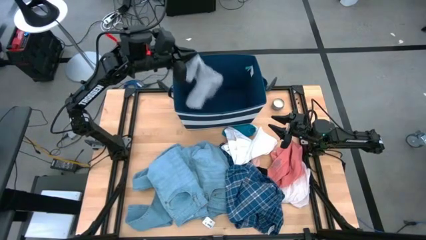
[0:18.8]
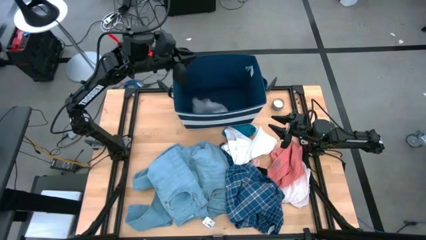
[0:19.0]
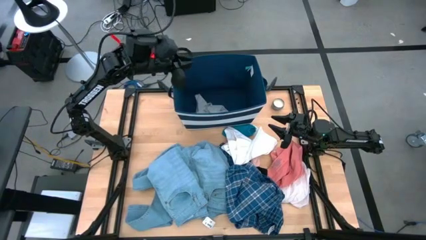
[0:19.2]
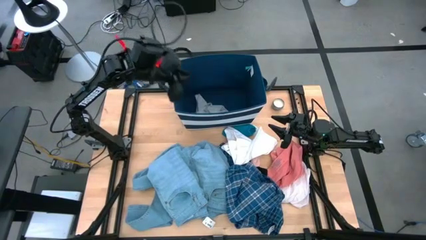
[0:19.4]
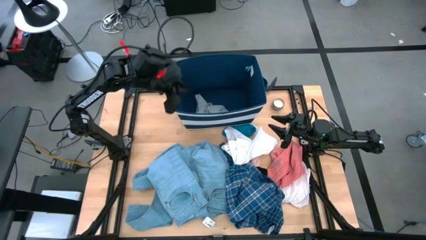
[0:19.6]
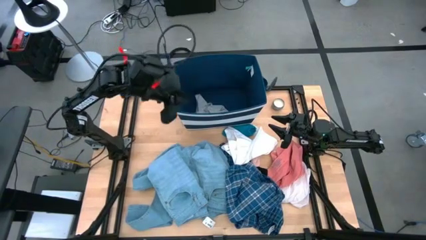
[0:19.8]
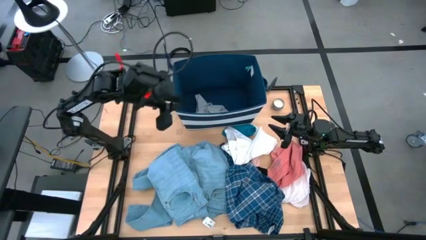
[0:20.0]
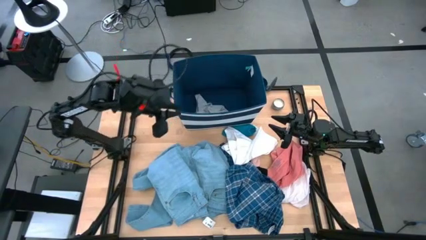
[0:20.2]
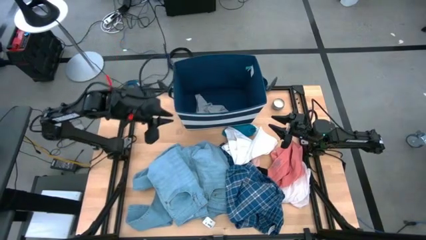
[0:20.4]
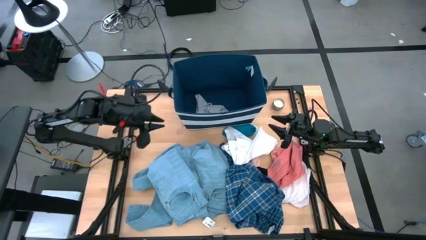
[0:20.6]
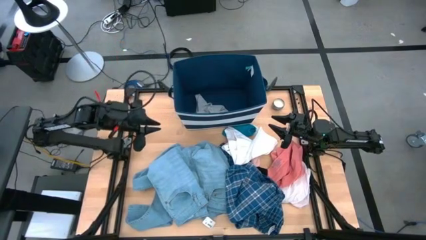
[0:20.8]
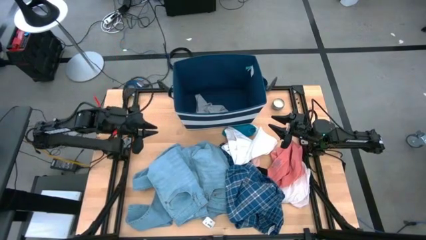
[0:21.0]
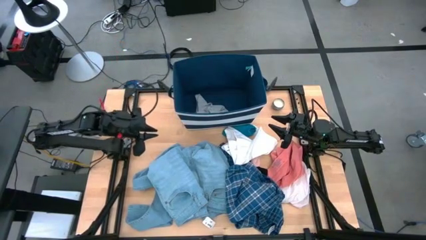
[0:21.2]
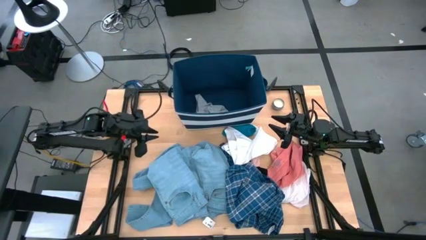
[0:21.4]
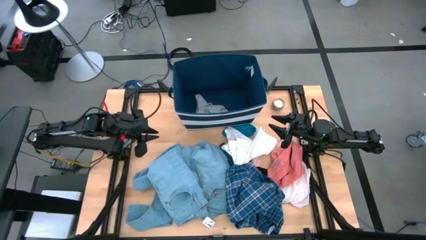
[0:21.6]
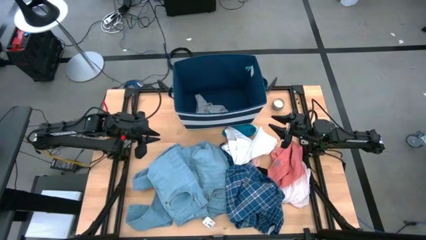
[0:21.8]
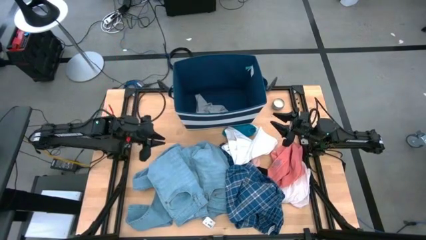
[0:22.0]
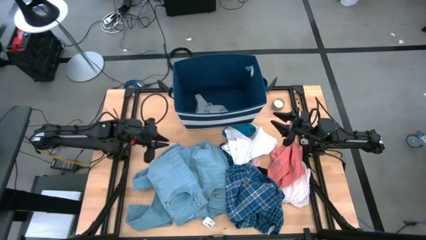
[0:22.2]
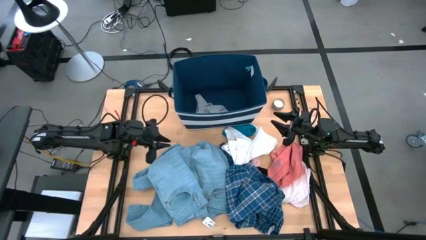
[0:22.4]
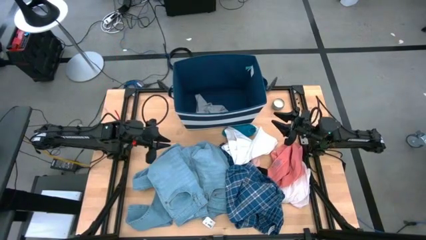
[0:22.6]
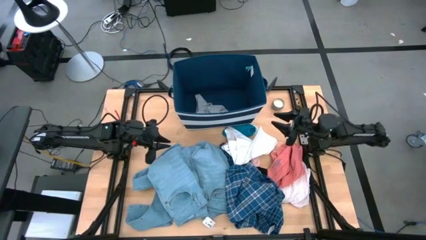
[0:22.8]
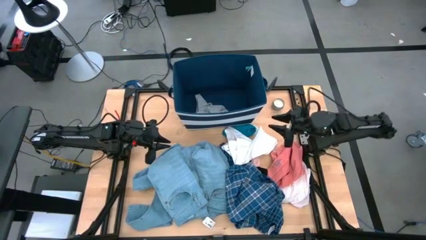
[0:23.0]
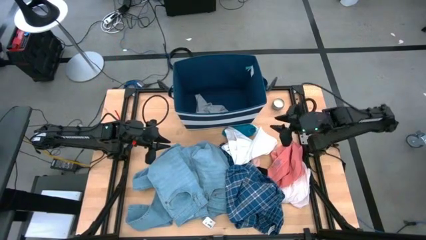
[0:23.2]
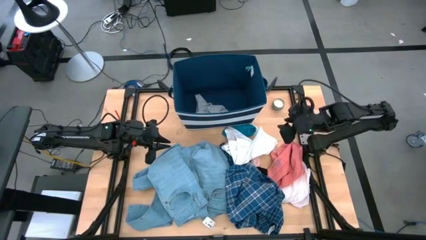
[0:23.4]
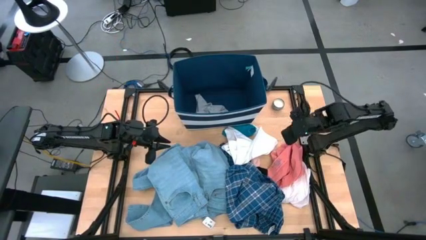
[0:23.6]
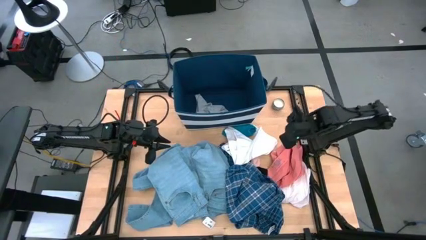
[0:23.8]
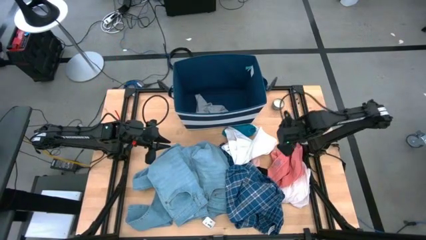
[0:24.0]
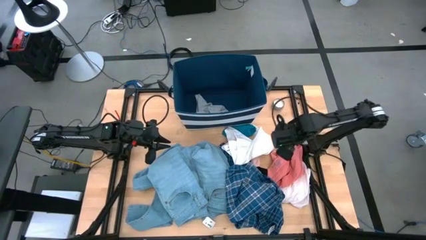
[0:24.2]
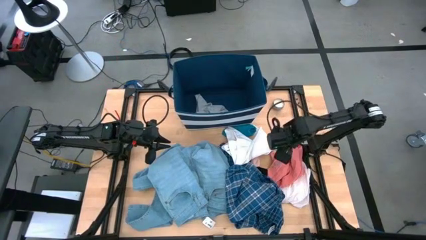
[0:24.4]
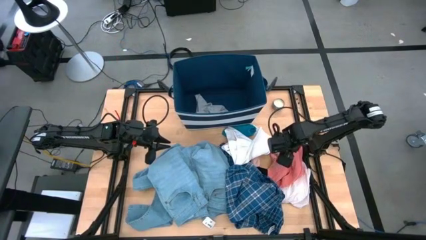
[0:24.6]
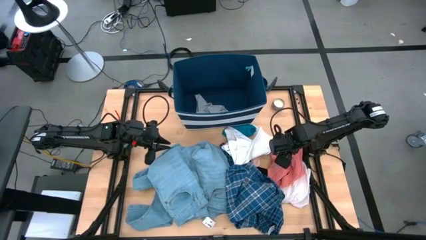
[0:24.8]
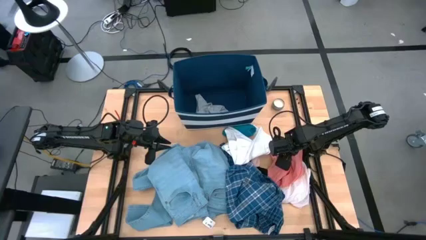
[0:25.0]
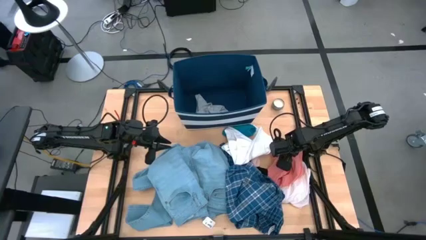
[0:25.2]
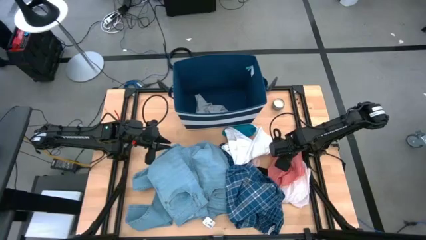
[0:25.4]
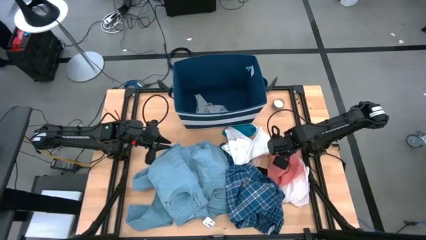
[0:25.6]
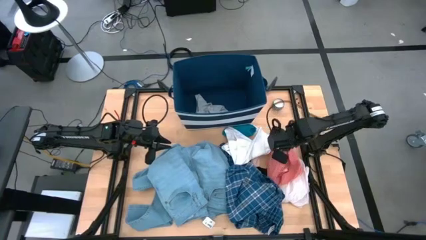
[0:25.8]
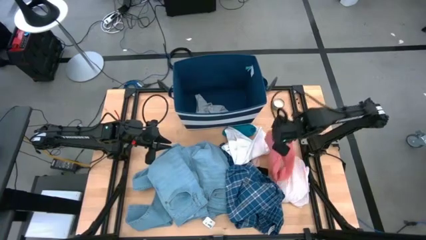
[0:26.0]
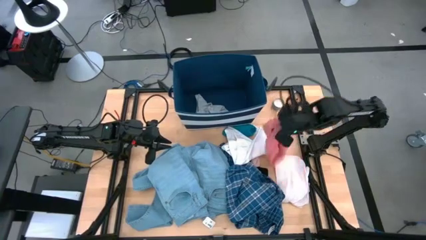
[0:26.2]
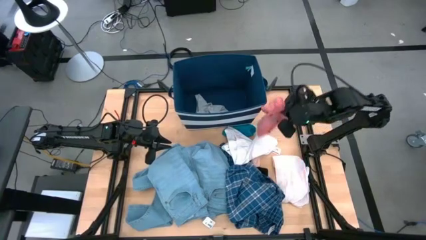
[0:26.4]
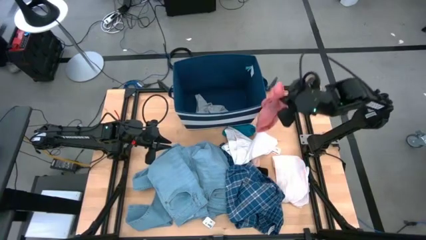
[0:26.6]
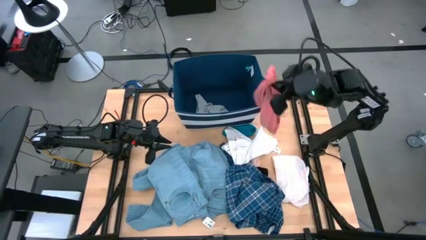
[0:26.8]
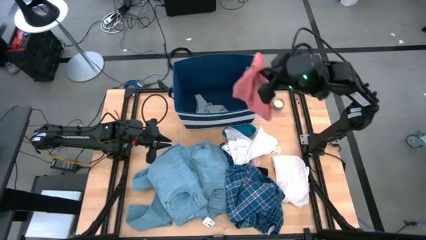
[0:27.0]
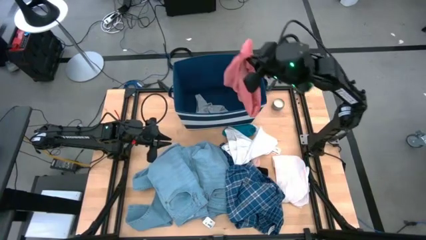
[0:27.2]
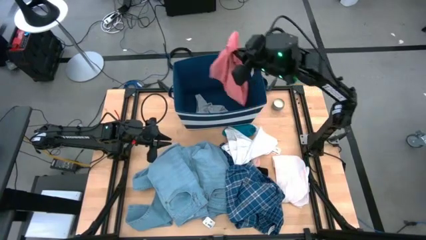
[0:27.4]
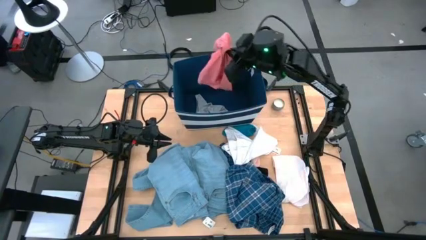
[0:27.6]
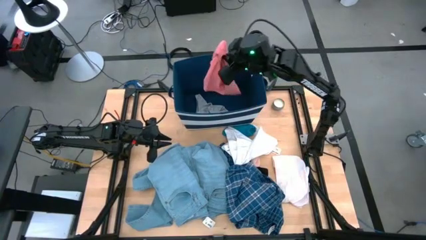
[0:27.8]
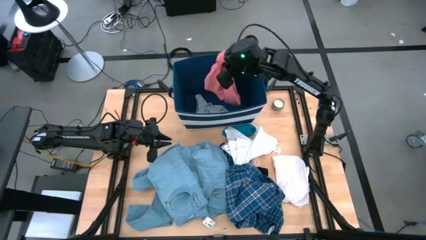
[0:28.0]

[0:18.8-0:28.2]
Task: Sort clothes
Put the pink underwear into the blue organizer bin

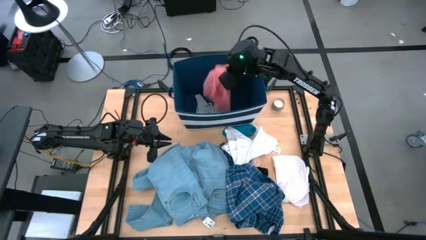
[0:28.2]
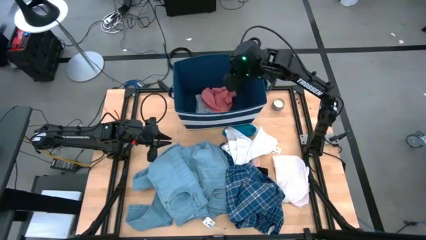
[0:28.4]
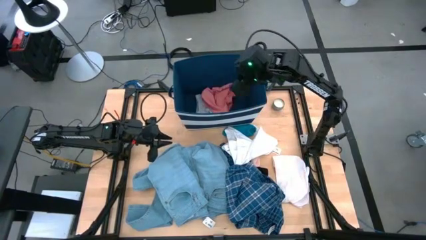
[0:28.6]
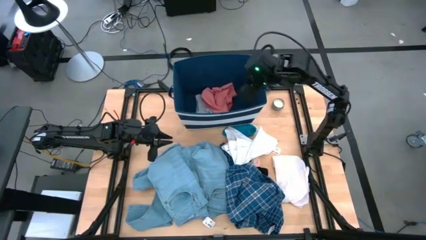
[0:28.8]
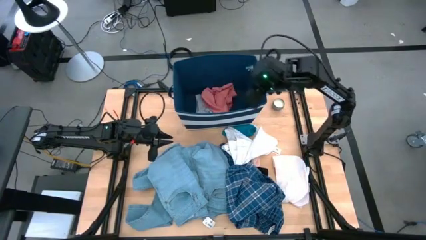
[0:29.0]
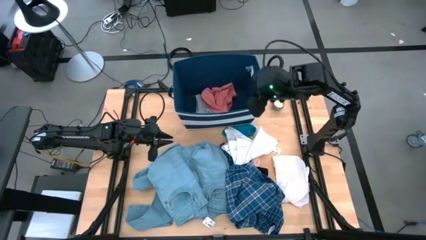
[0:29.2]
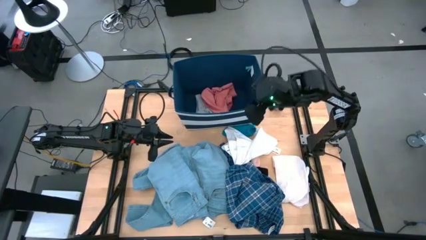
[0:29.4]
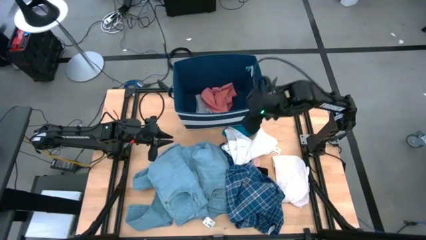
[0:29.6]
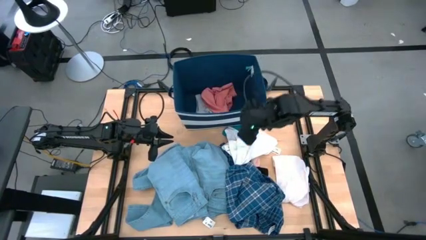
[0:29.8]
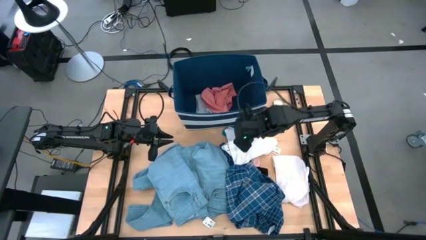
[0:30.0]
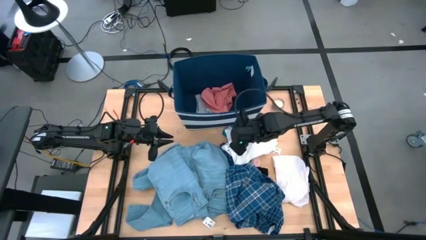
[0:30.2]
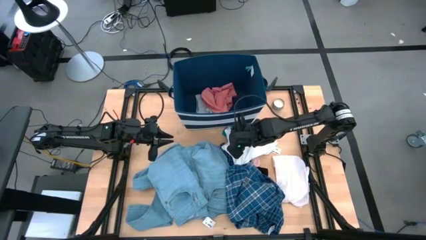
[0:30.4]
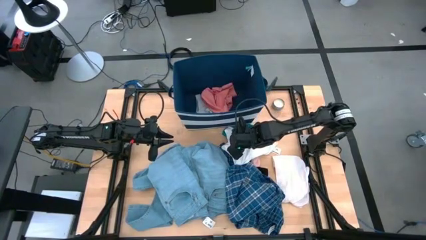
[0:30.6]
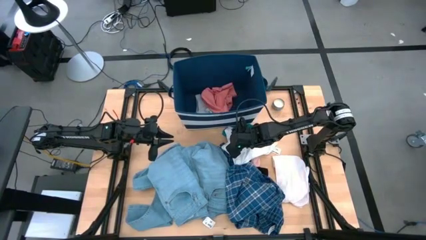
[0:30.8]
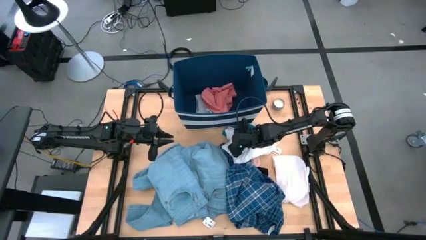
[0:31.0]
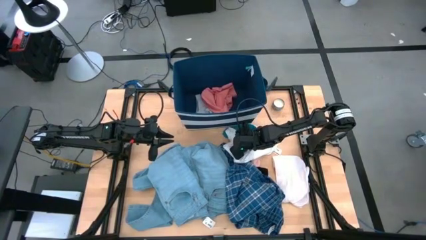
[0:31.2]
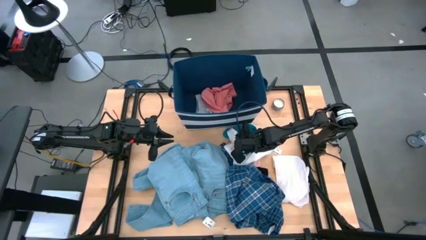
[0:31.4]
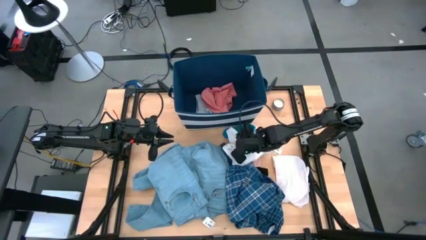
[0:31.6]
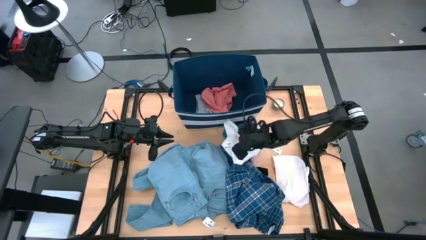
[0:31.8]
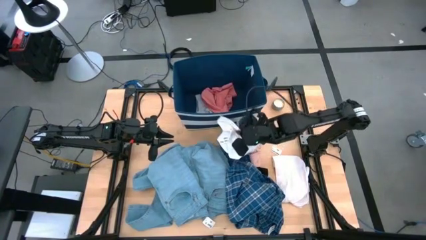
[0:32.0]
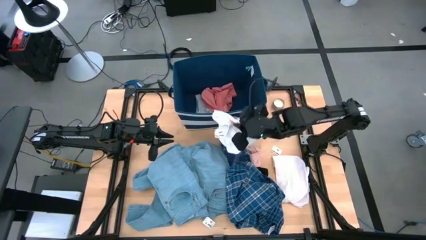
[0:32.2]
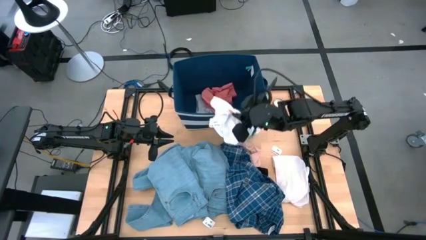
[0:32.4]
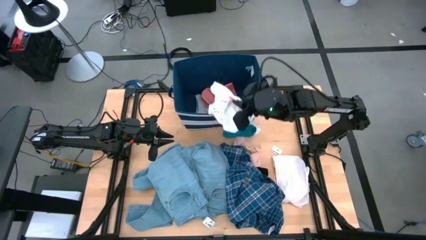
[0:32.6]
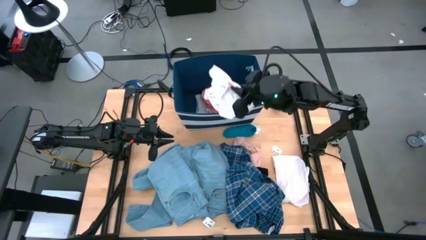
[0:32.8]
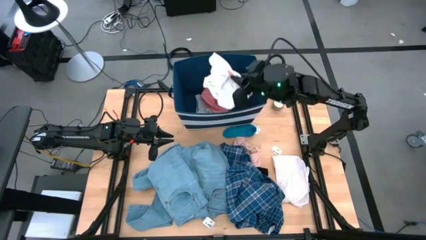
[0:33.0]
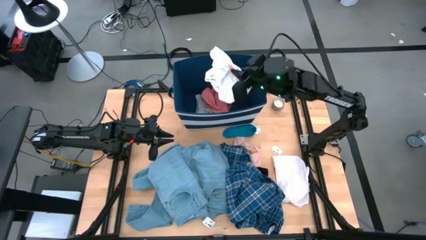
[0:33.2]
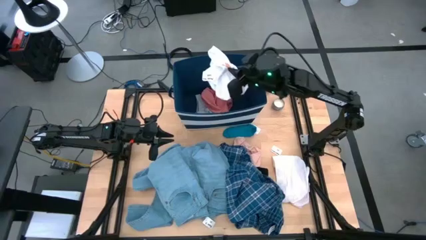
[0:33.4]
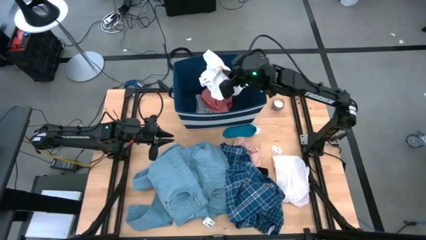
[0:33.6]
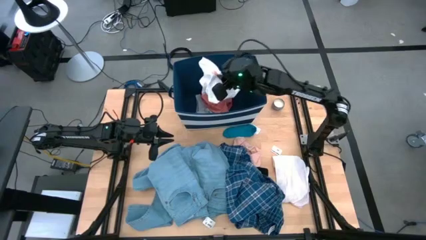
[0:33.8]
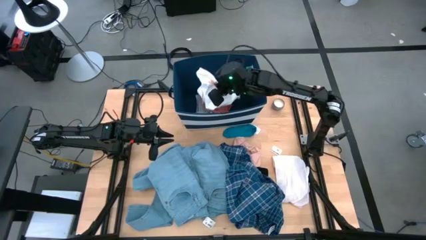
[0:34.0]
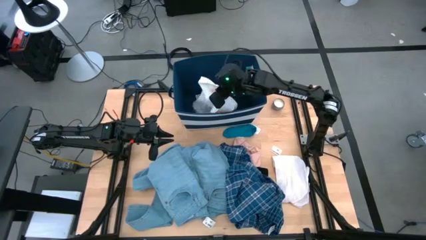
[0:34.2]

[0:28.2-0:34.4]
Put the white shorts into the blue organizer bin
